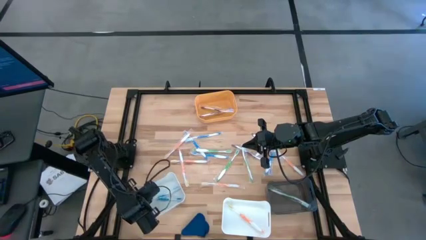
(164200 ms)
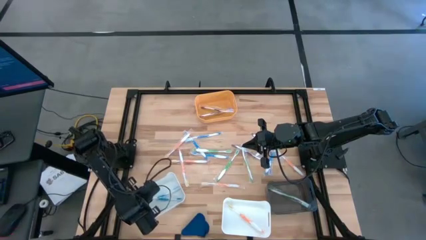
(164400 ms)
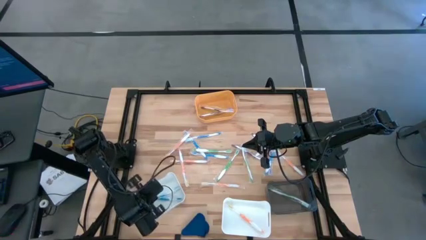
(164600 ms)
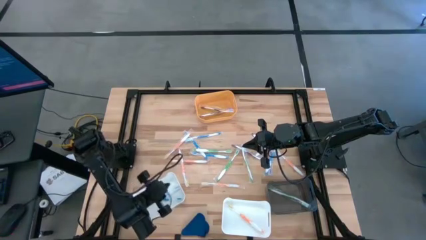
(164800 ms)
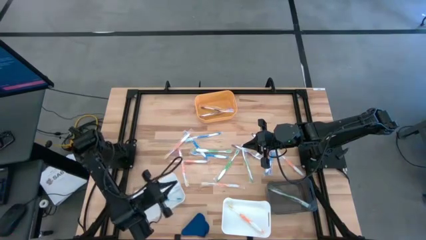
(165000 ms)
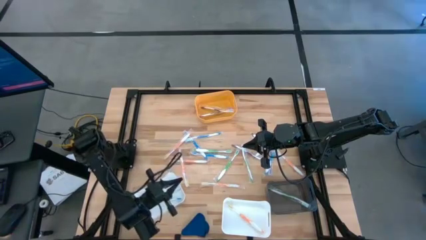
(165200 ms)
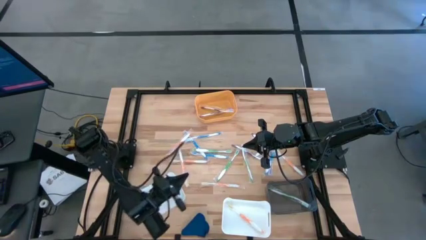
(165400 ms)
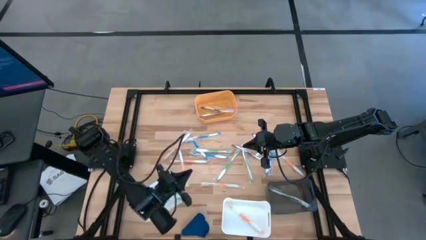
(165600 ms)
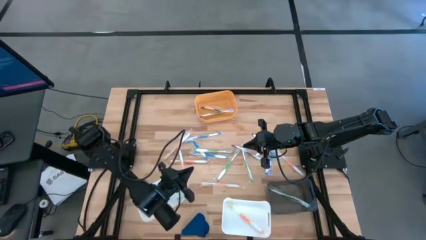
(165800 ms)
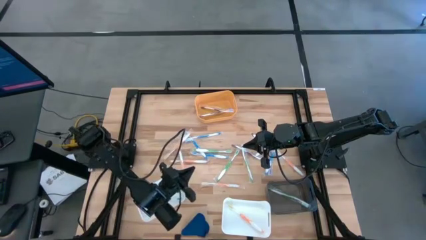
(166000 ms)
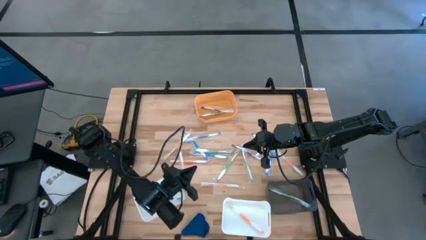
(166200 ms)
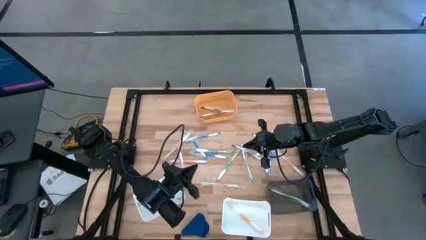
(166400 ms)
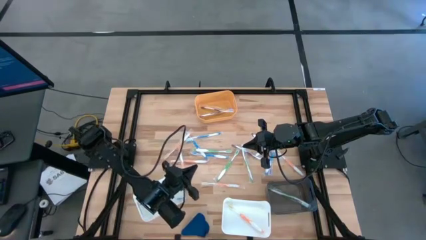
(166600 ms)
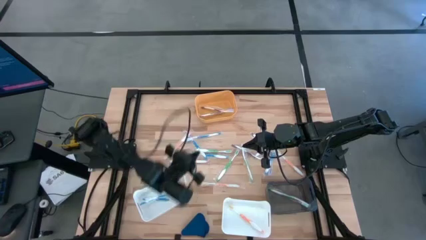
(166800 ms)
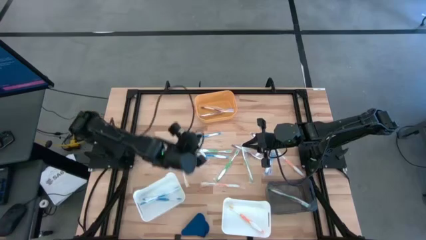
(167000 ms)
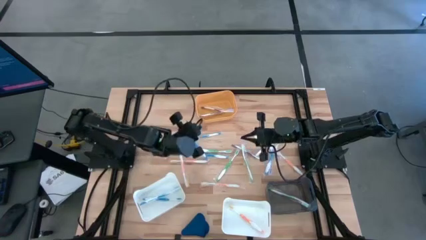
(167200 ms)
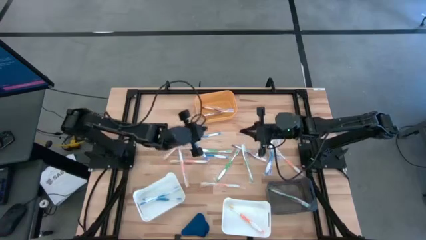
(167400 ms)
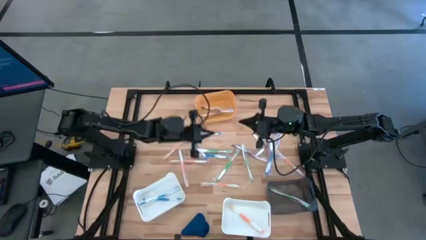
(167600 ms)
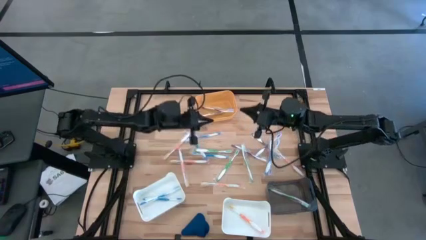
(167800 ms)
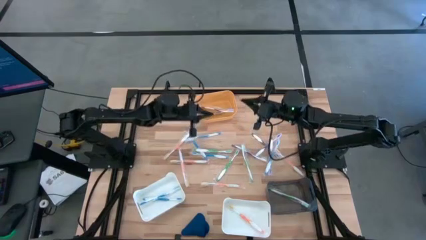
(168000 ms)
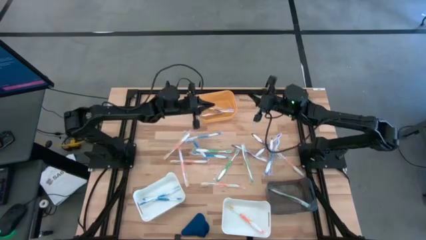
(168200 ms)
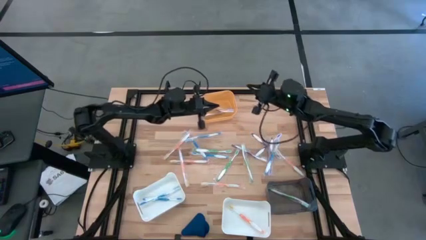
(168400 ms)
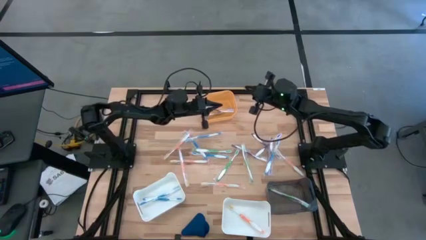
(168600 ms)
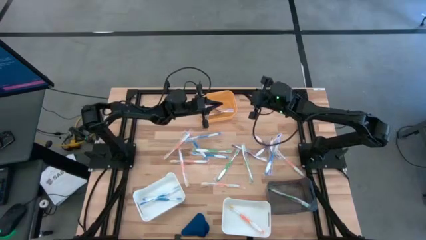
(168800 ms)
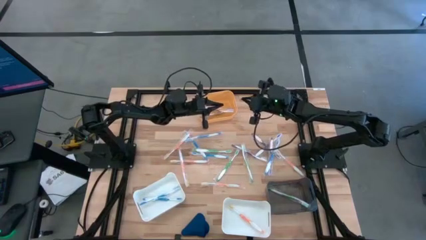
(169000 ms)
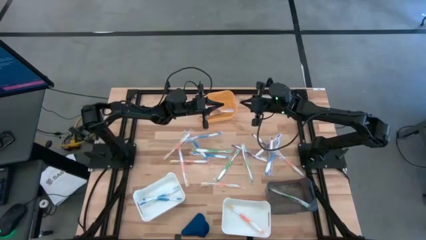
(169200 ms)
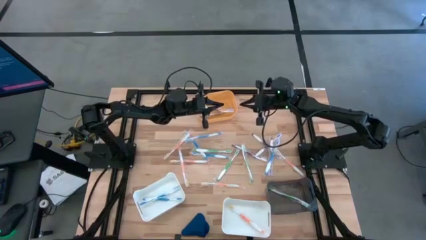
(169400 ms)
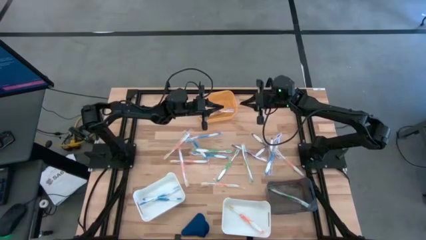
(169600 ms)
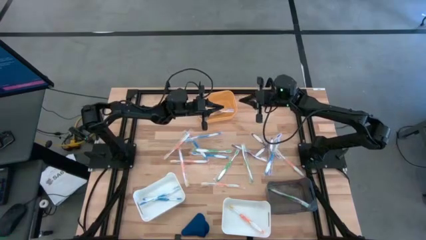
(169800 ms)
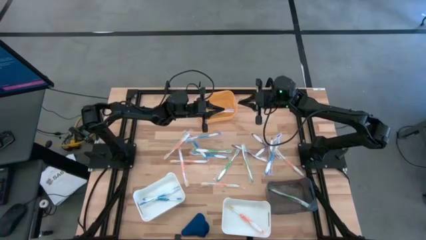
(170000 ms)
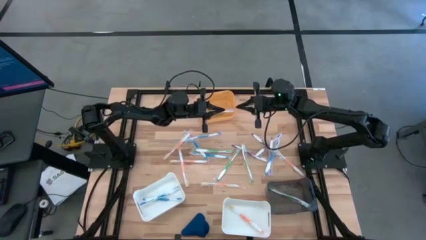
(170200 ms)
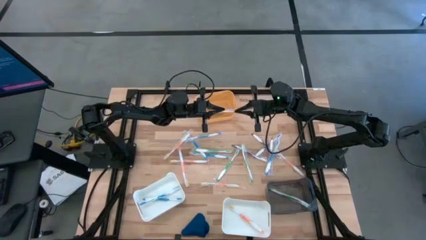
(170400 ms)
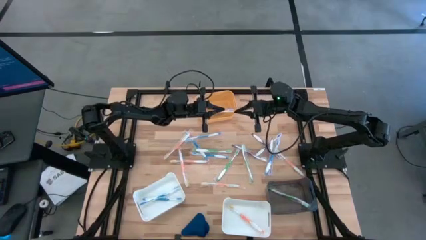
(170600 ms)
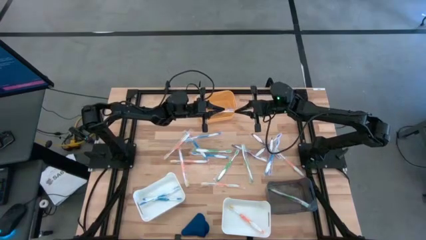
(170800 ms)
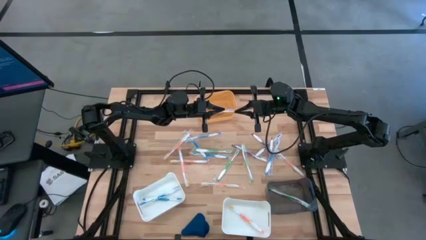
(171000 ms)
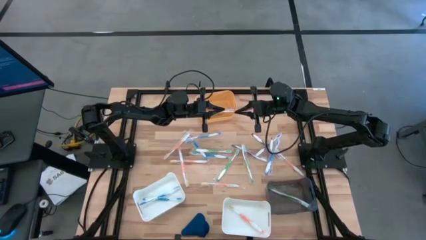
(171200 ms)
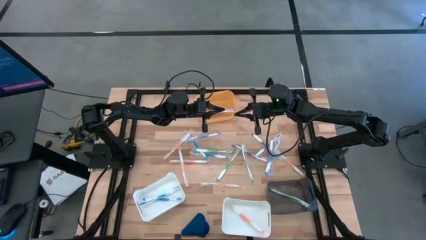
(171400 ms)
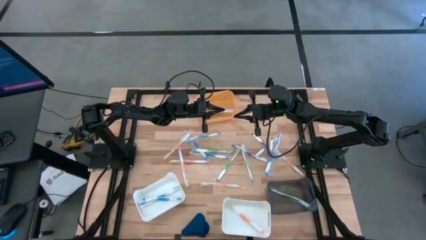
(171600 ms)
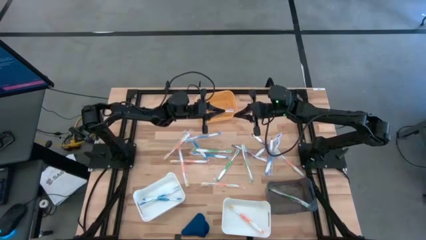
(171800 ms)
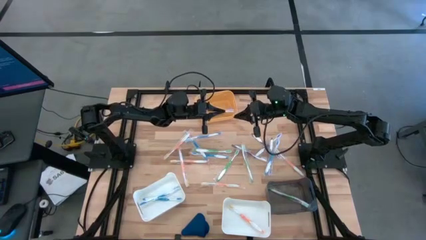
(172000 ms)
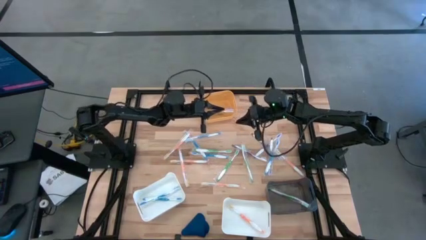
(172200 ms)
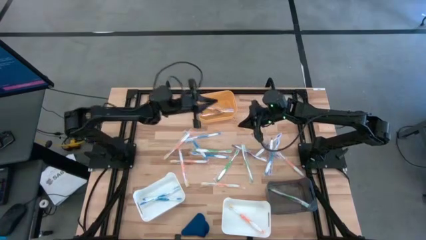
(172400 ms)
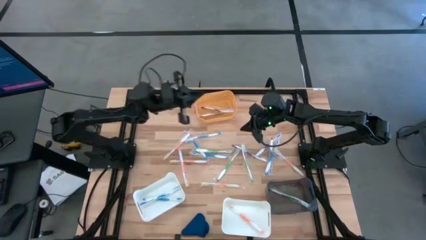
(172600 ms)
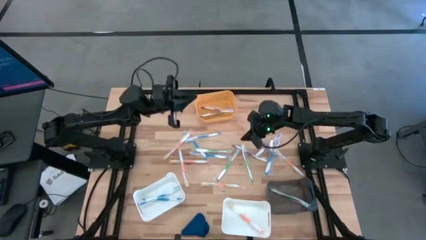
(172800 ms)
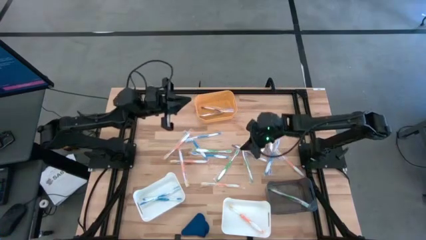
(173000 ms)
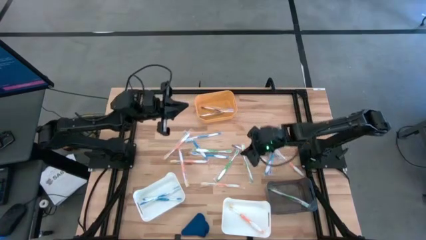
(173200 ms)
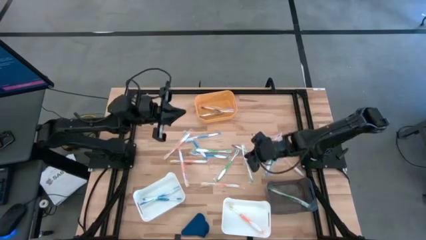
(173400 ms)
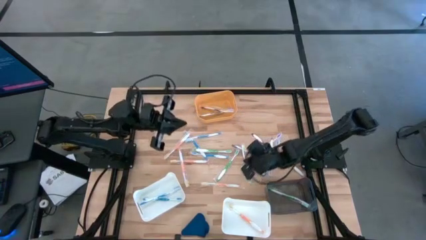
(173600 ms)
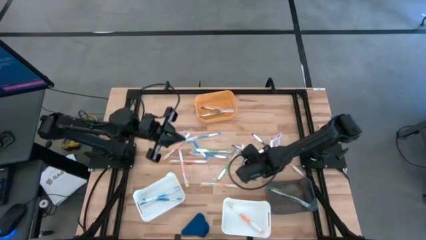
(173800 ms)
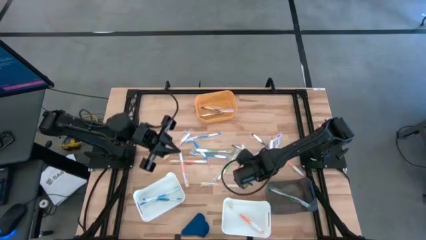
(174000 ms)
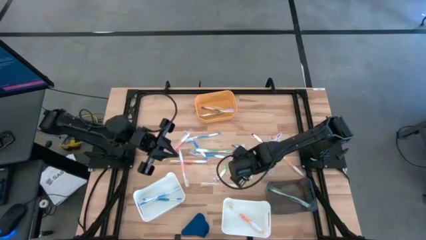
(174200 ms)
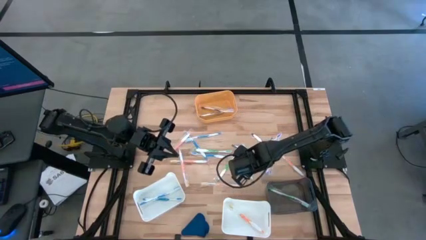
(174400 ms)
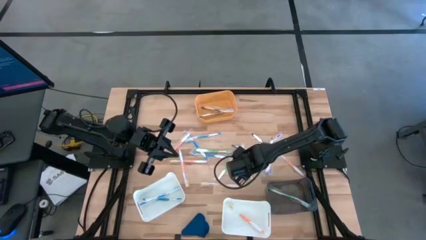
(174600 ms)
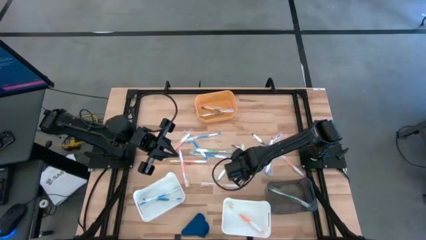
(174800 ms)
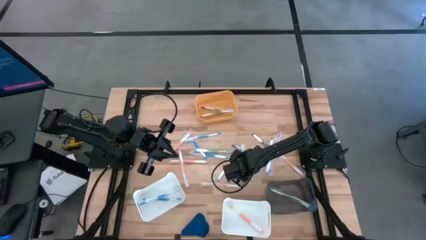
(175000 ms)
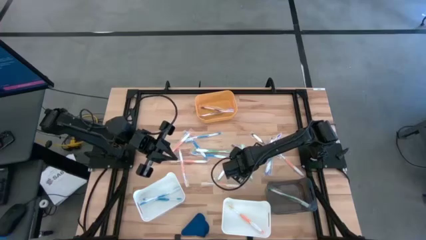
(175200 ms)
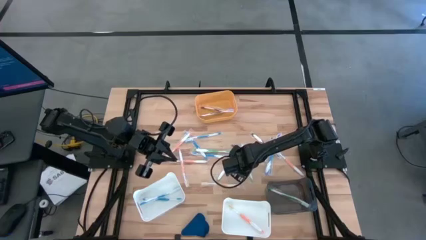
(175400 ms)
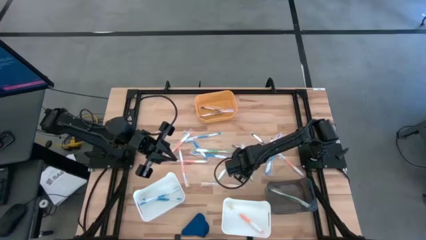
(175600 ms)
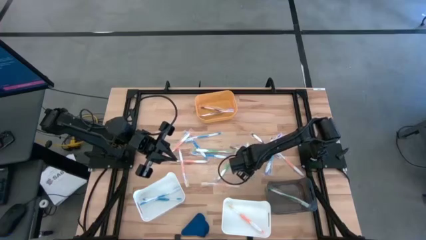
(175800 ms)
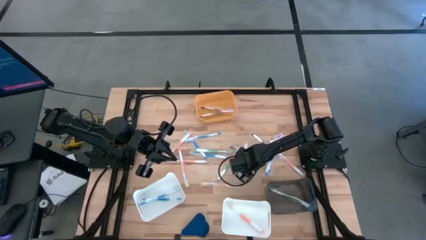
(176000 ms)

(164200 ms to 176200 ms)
Task: Pick & Place Toothbrushes
Put the green toothbrush into the black bin

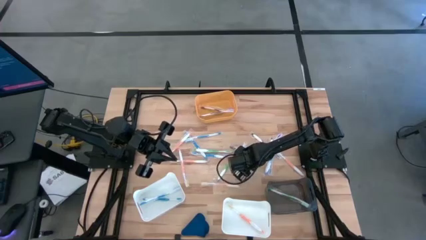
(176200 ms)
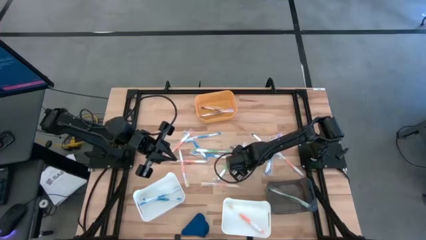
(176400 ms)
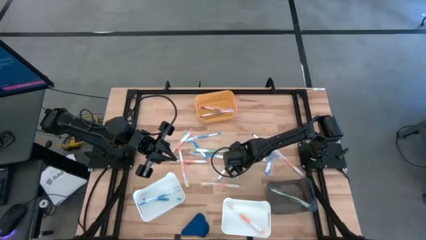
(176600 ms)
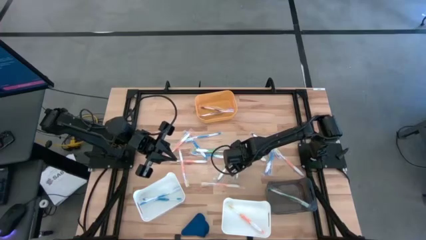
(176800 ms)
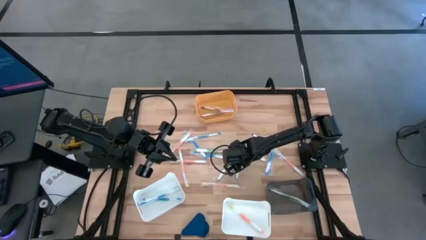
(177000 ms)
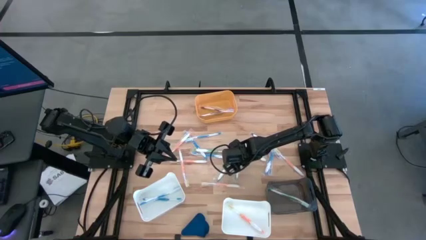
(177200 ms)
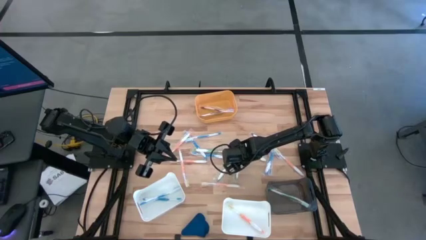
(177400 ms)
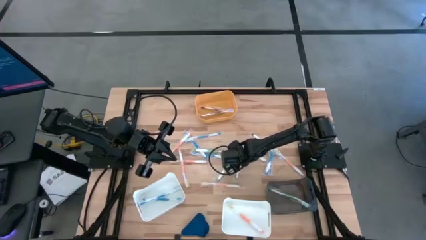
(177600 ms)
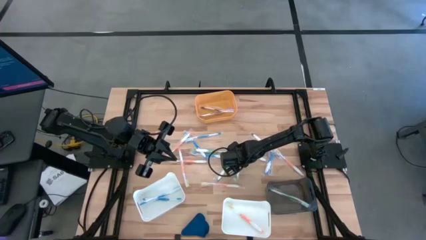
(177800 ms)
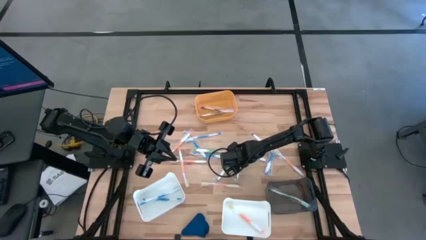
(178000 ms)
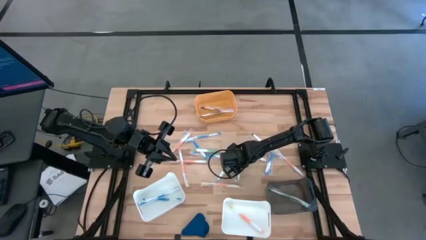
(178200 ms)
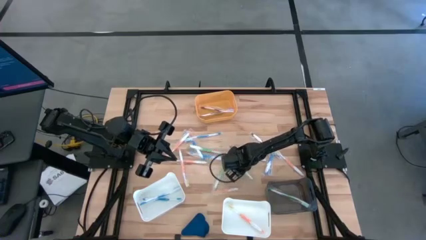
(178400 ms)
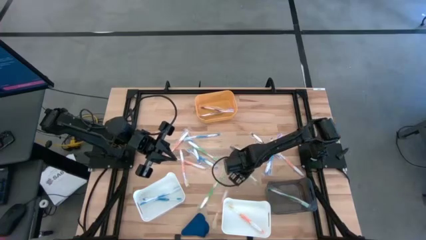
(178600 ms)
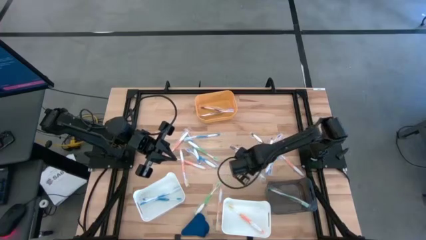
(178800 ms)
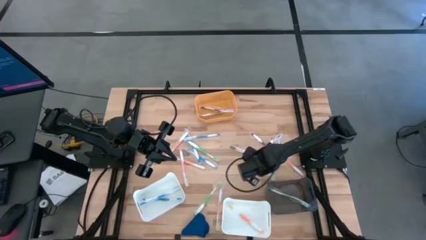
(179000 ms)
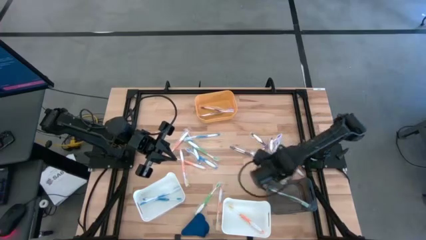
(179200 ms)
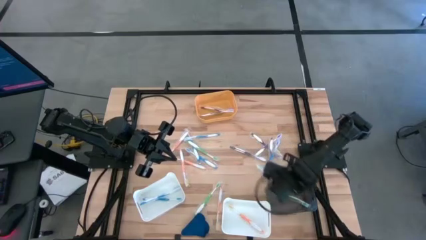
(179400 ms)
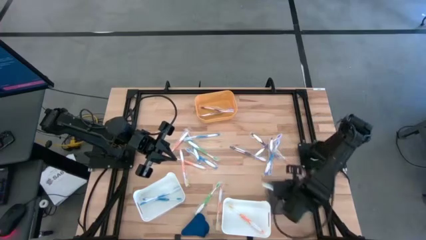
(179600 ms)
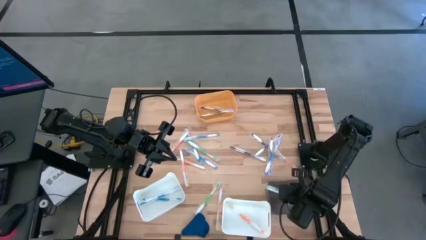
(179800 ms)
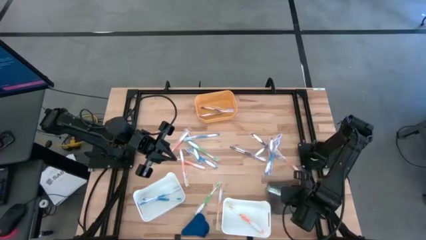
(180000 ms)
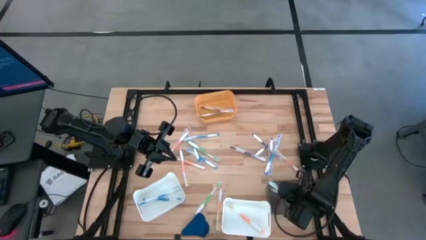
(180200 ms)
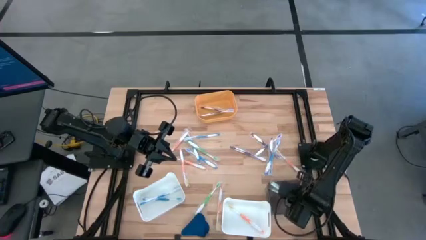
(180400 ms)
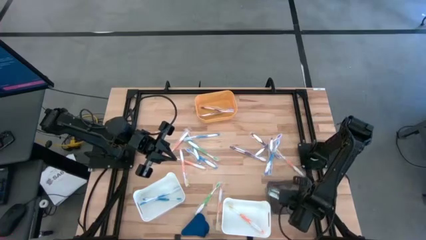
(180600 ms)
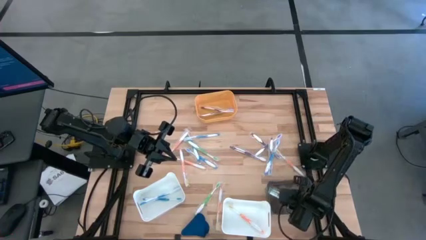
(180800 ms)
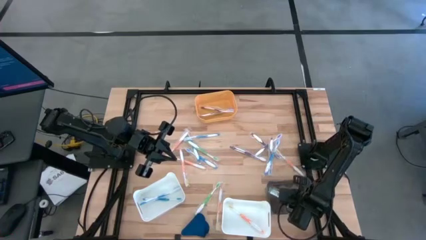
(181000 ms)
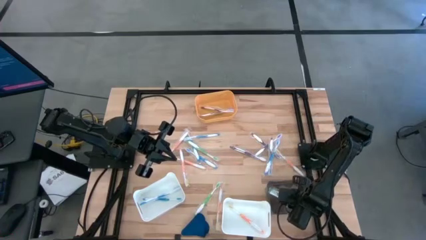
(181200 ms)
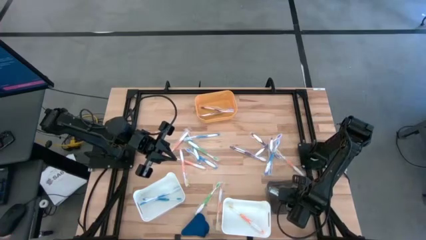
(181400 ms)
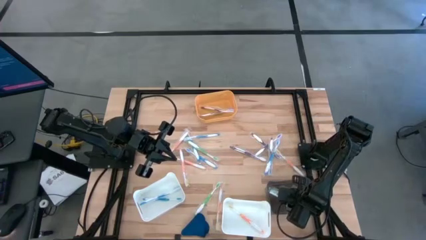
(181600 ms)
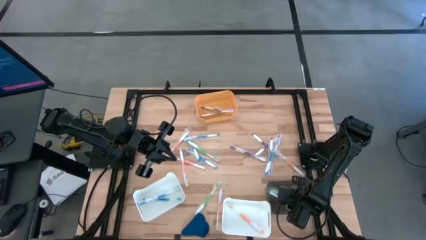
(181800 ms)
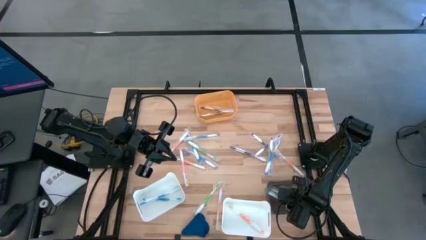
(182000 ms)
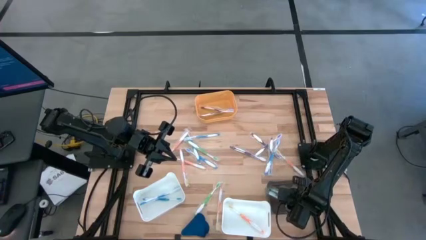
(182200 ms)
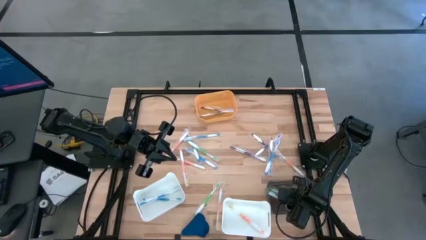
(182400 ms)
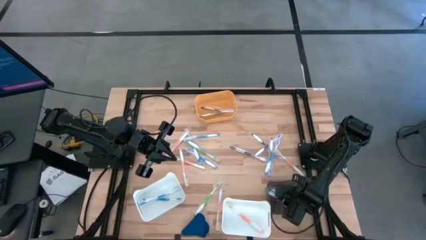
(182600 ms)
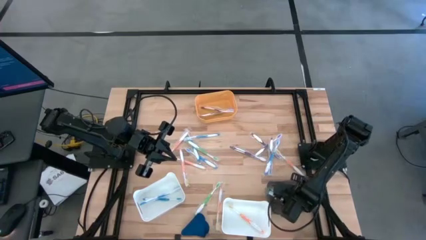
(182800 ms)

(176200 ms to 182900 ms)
Put the green toothbrush into the black bin
